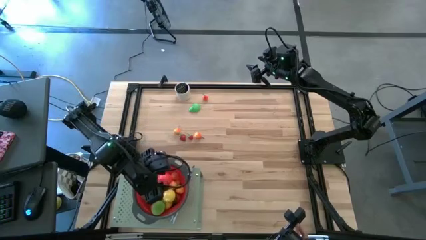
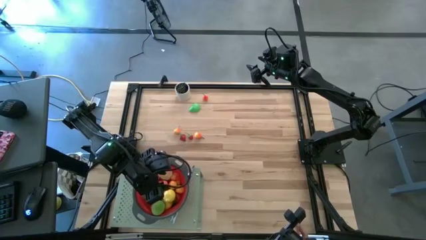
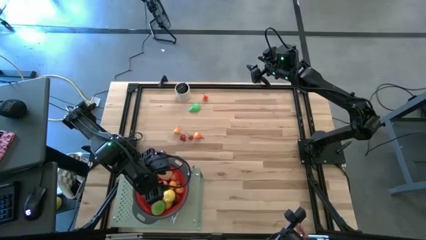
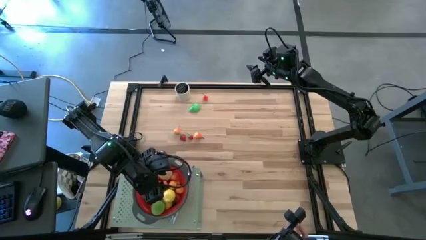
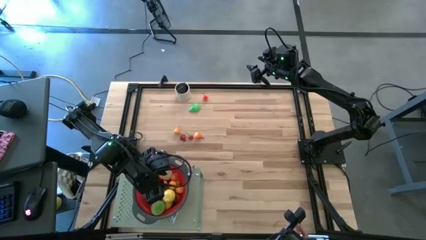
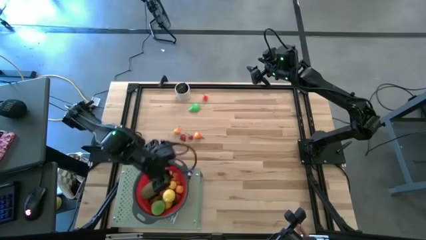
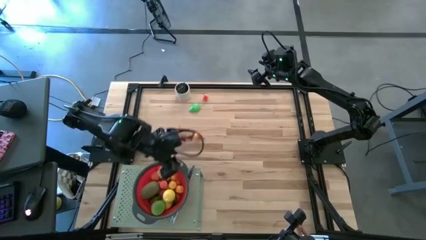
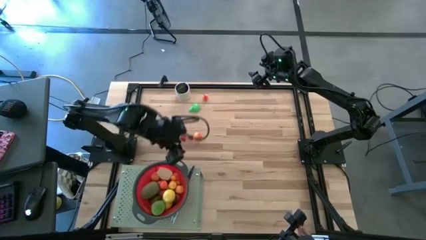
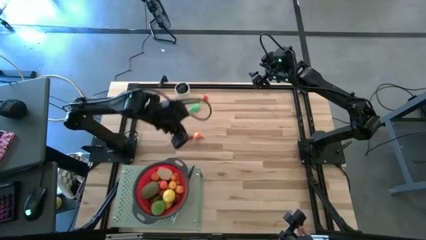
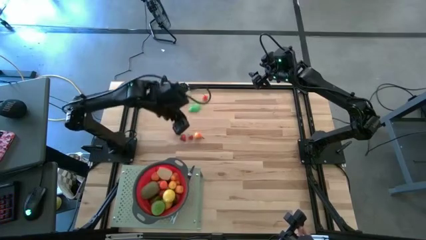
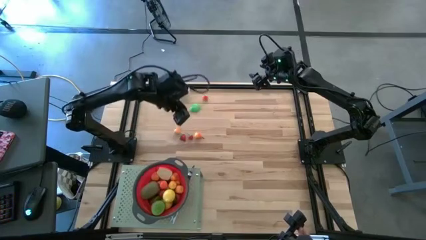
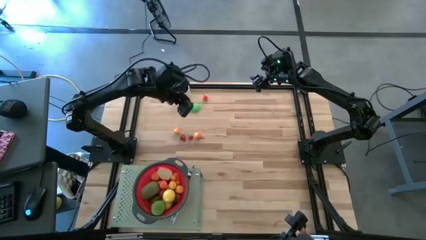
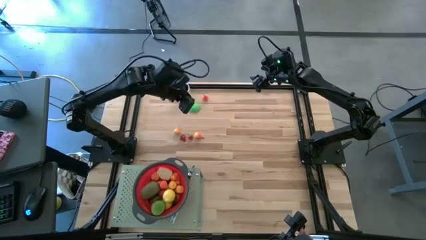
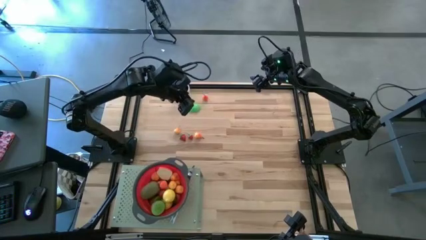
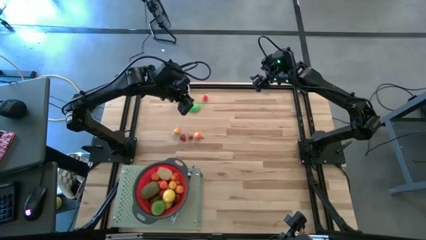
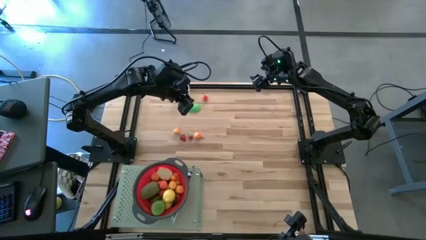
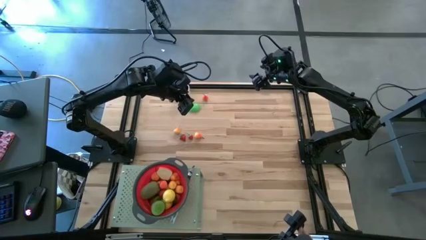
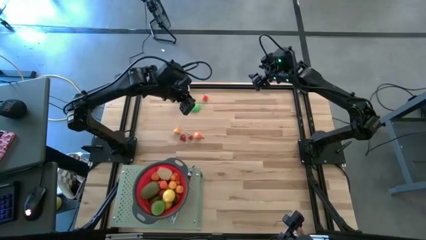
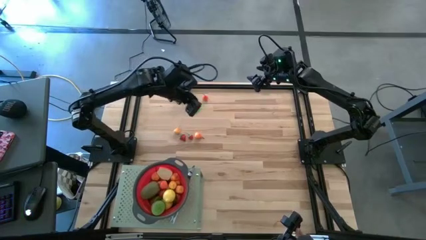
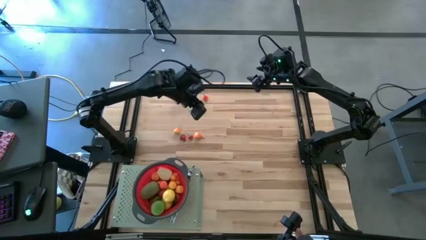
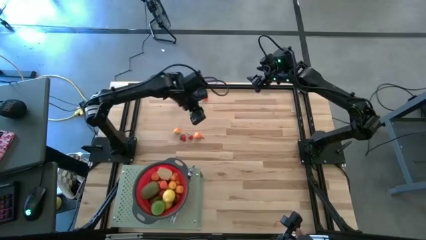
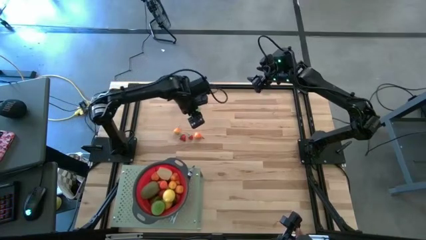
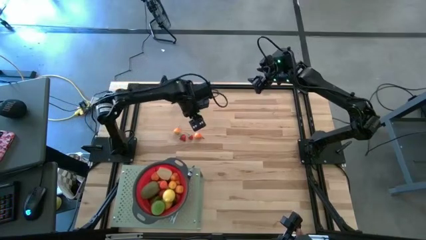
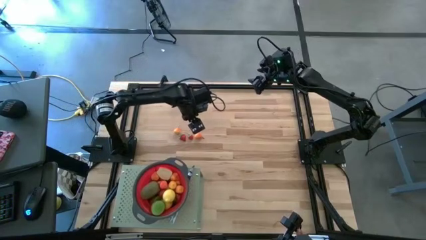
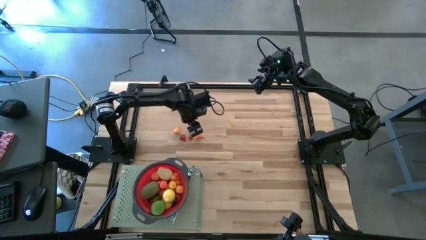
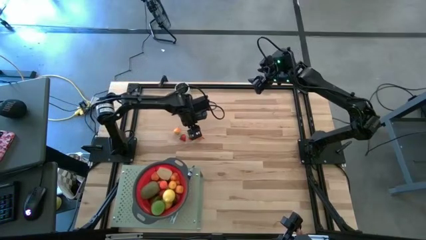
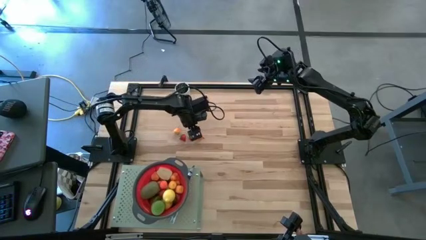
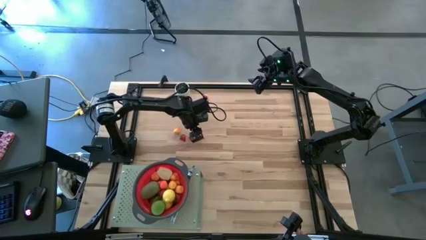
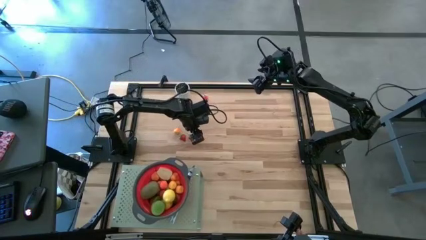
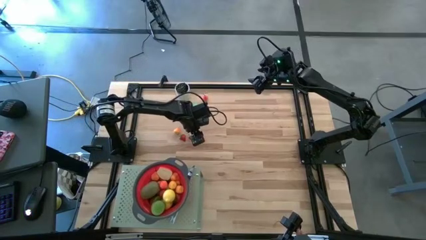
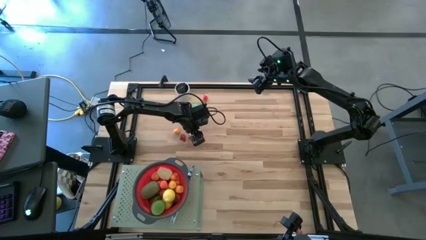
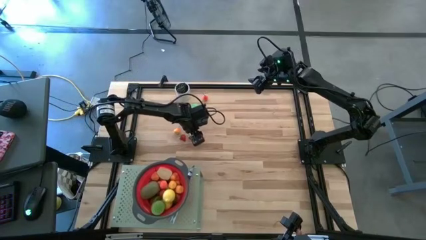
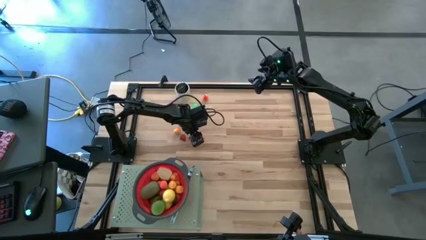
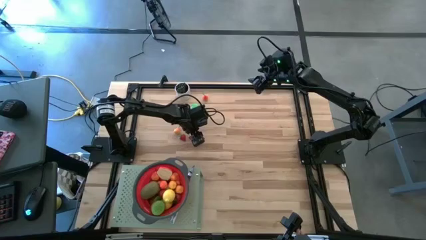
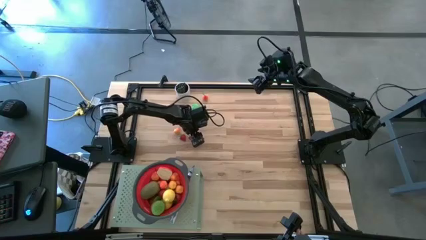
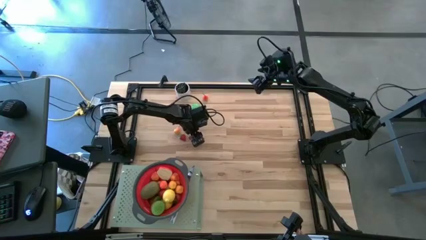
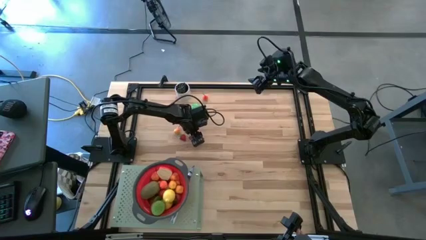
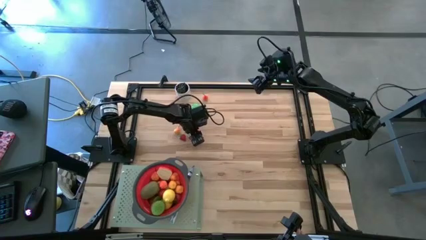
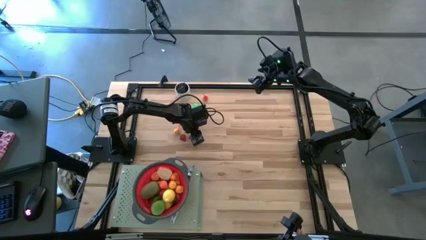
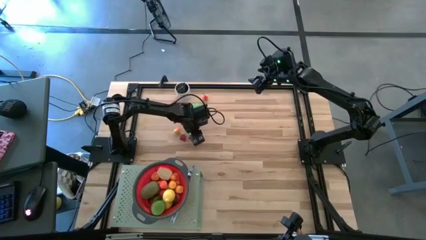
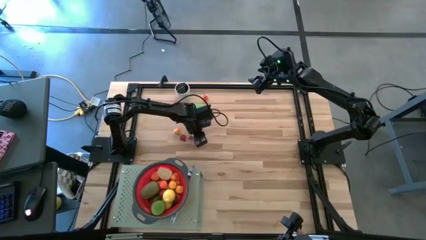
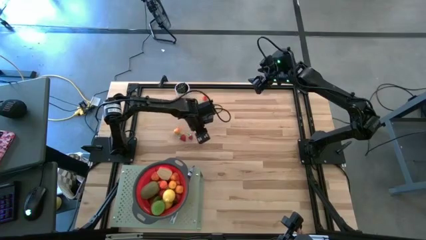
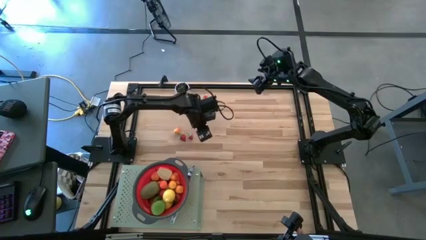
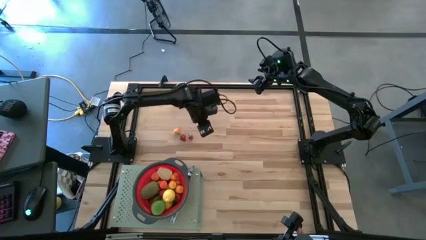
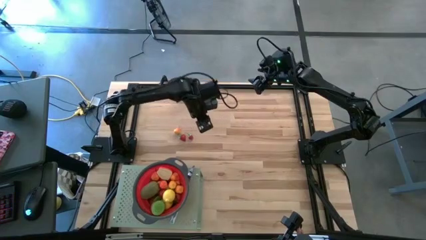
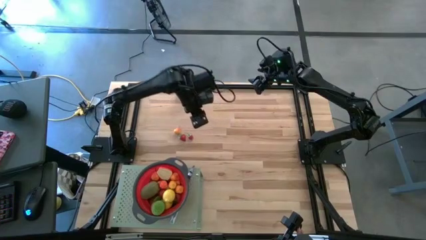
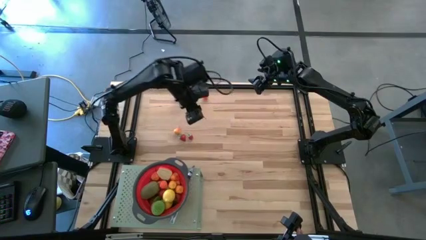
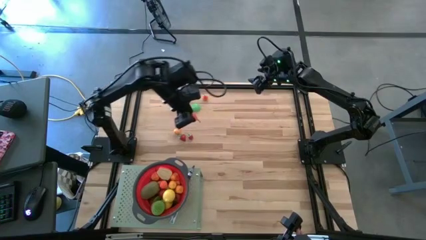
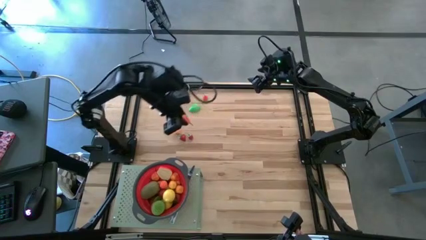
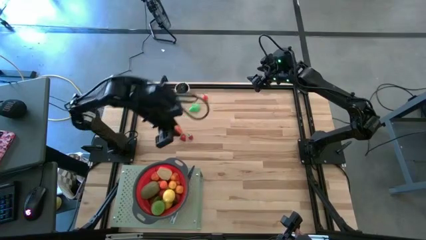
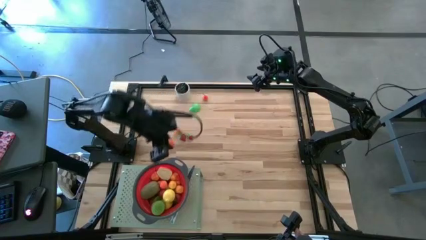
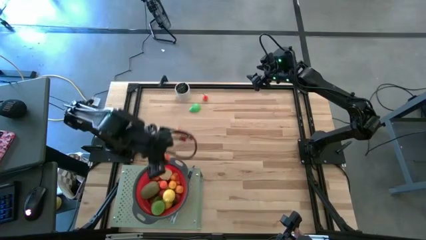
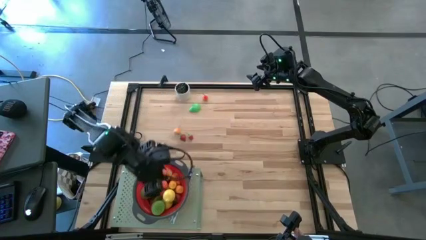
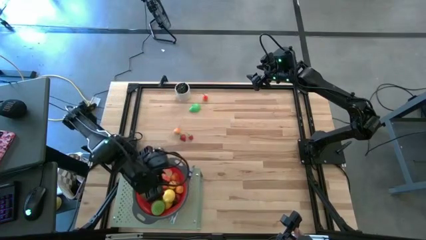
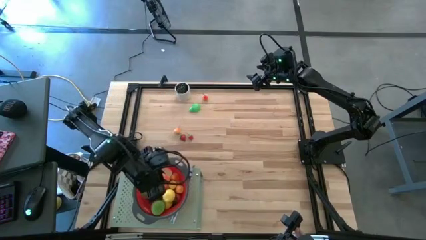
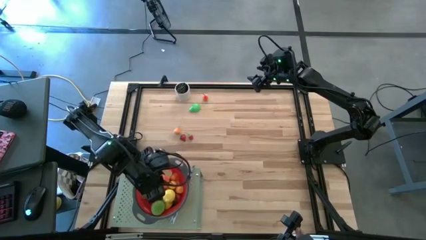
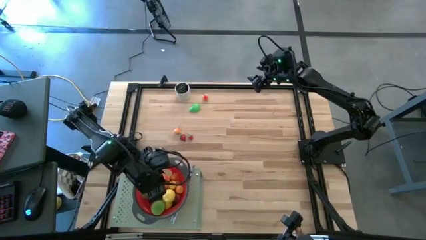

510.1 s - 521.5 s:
Task: Pick & Place Fruit
Put the pear into the red strainer bowl on the shelf

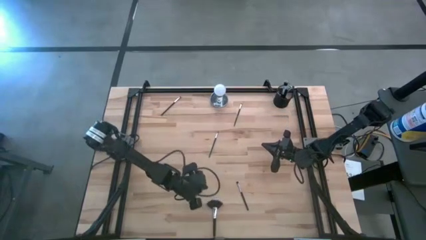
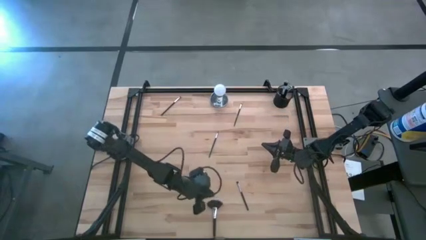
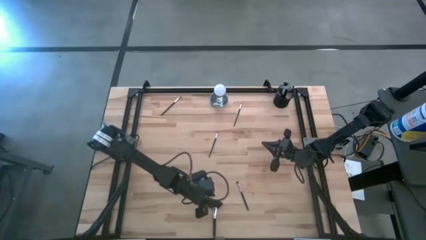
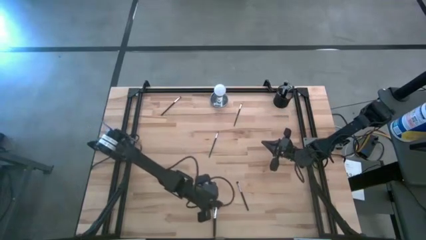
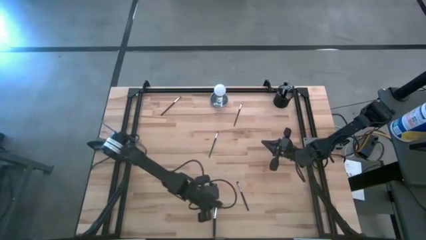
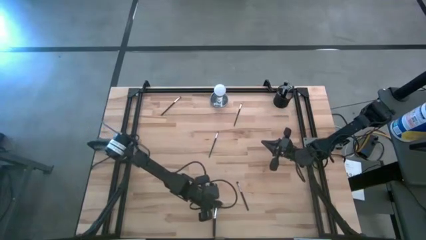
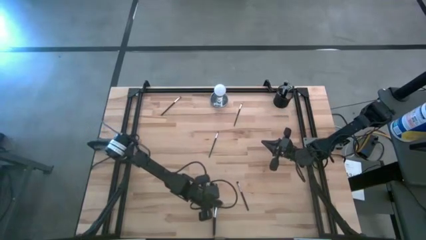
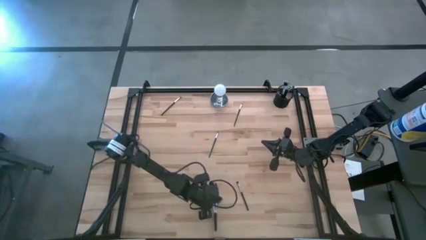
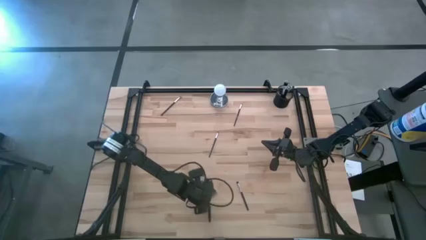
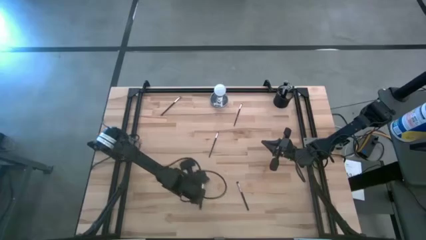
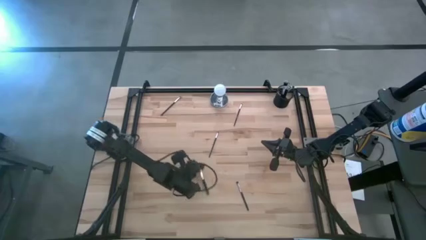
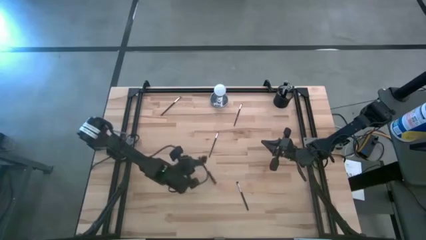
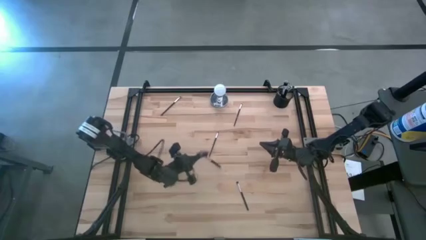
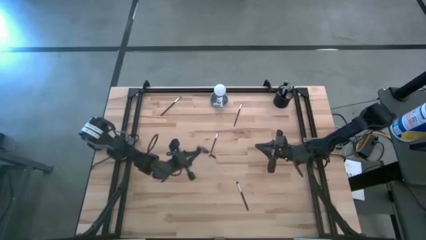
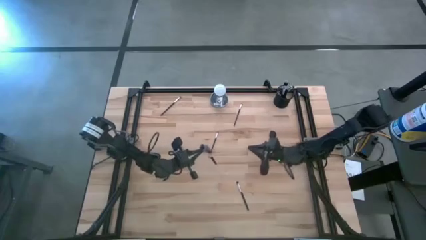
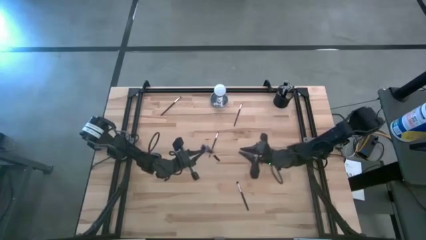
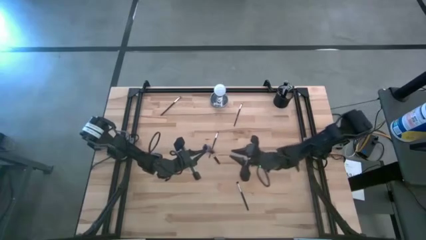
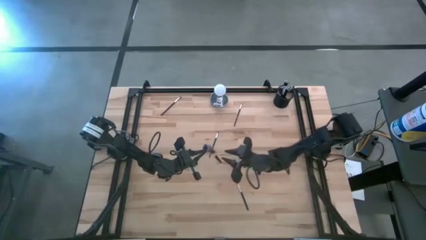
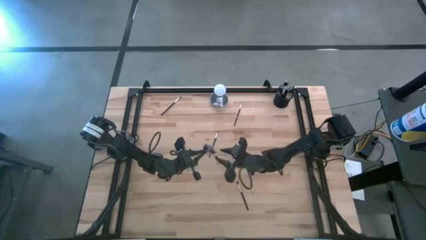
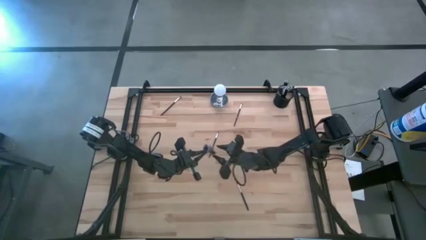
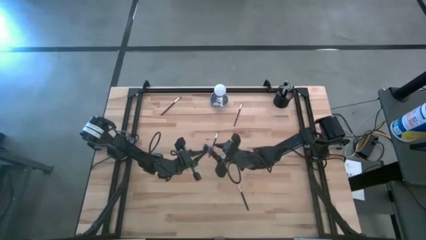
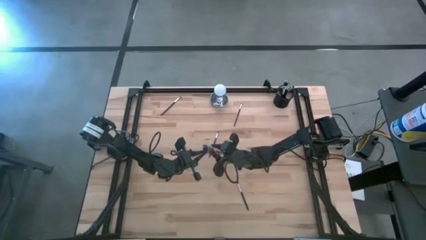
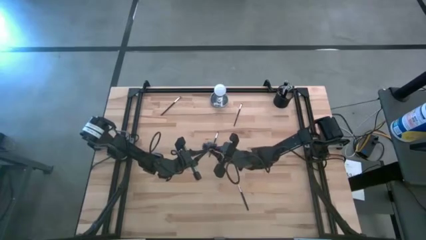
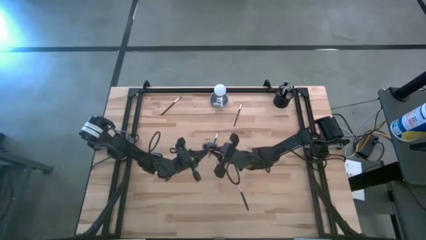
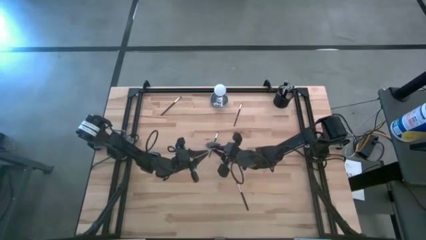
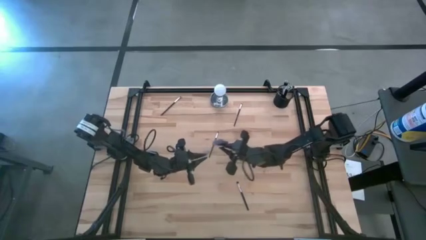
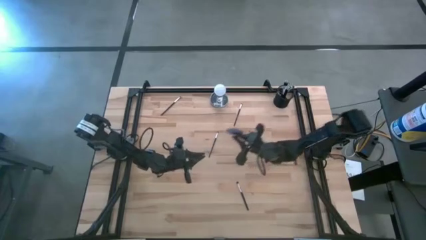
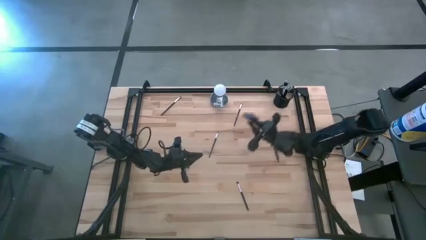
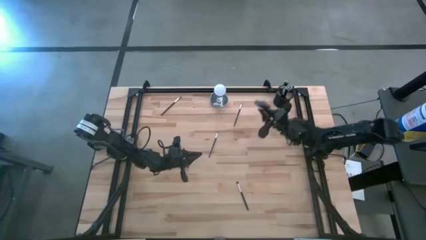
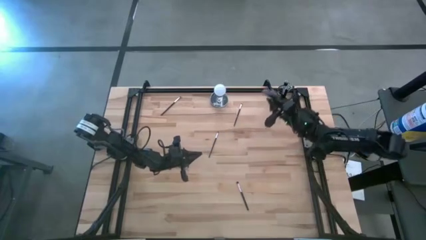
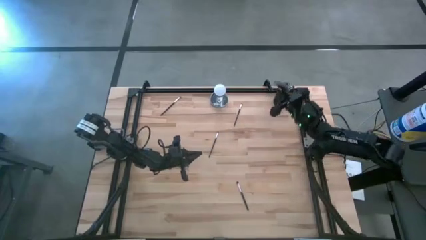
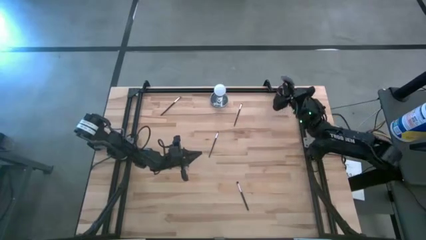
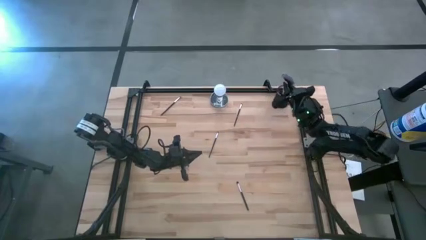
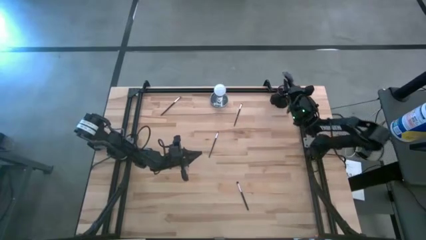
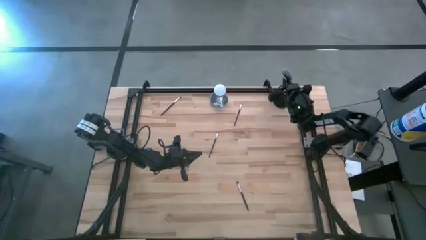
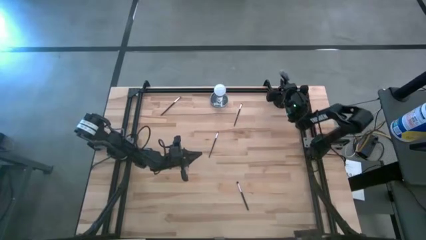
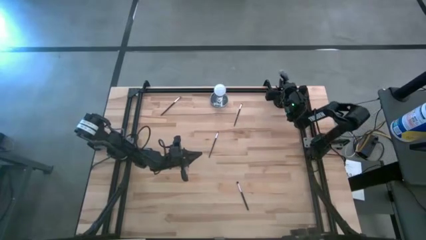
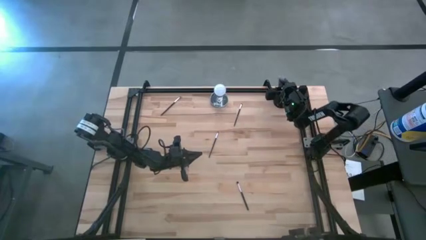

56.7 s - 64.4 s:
Task: Pick & Place Makeup Supplies
Put the makeup brush into the makeup holder
